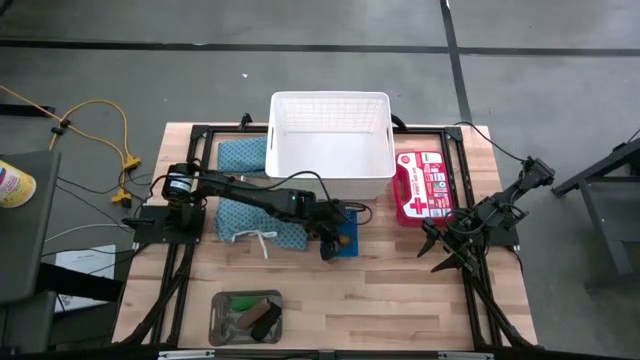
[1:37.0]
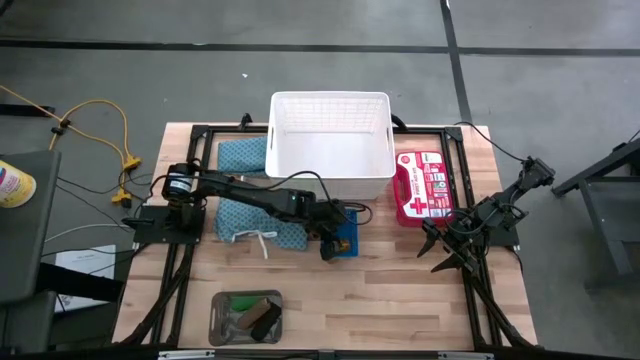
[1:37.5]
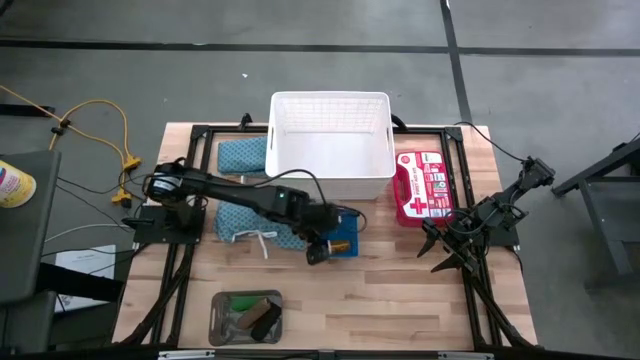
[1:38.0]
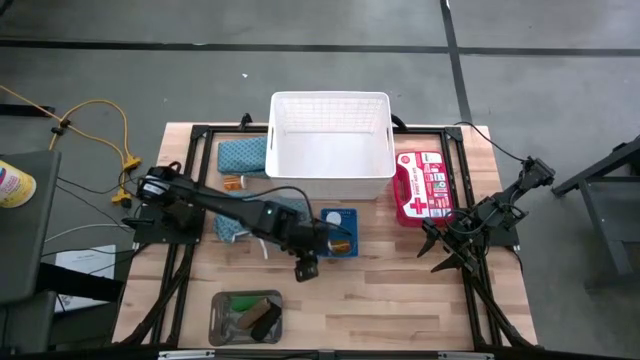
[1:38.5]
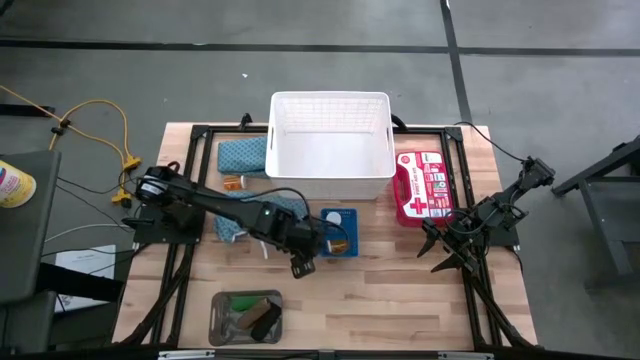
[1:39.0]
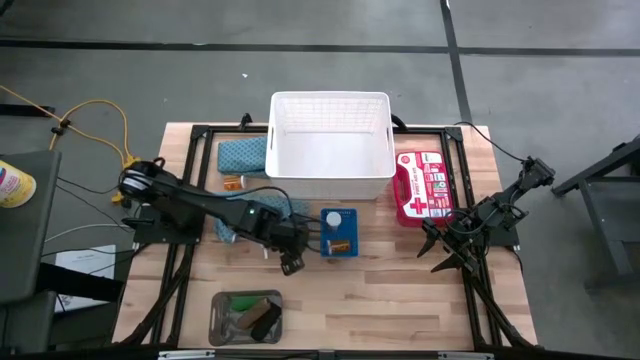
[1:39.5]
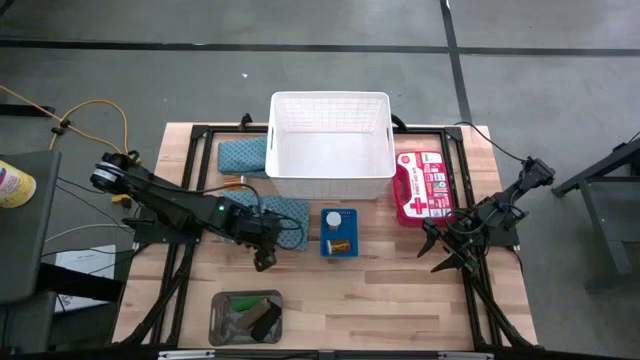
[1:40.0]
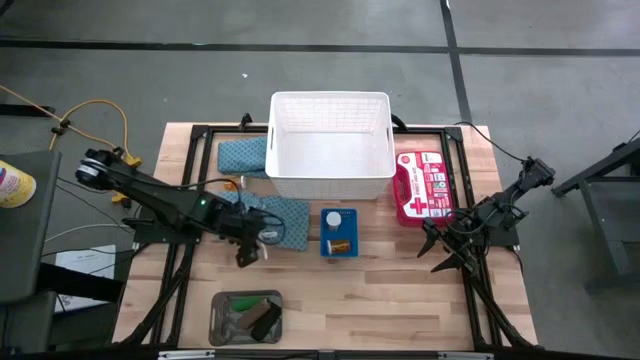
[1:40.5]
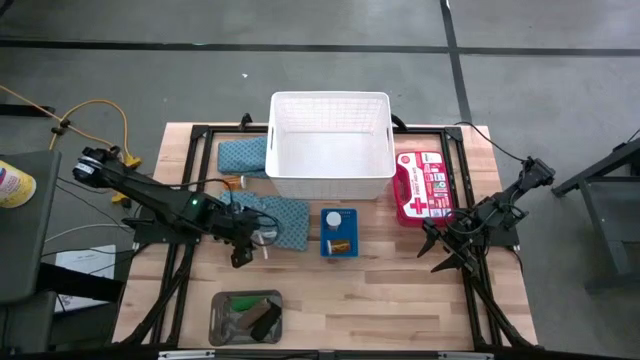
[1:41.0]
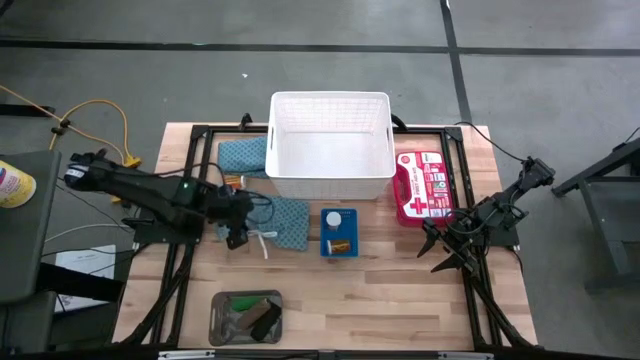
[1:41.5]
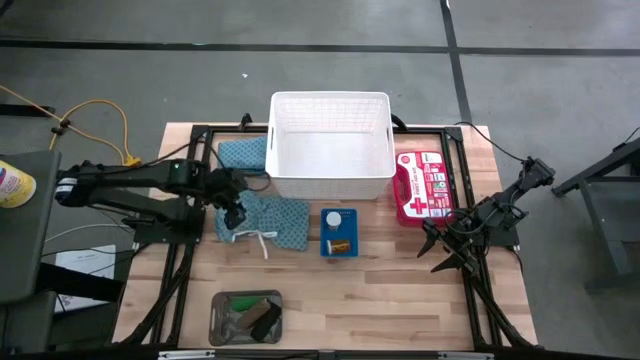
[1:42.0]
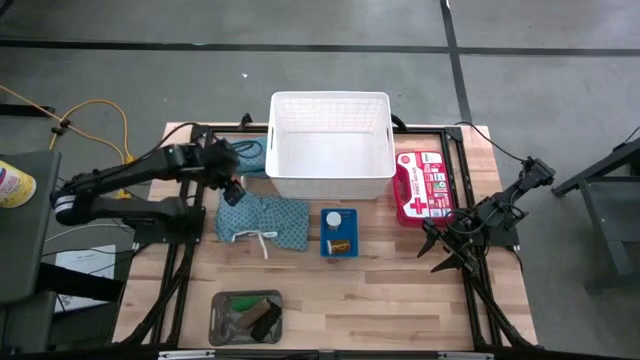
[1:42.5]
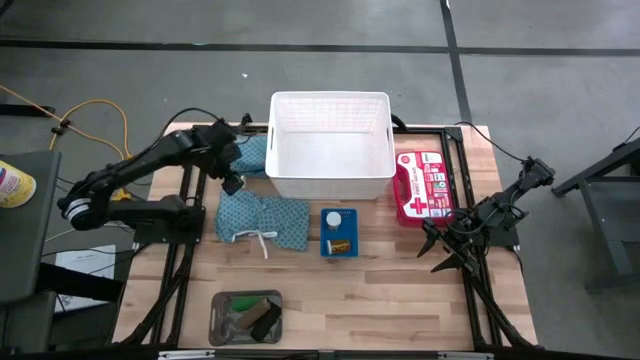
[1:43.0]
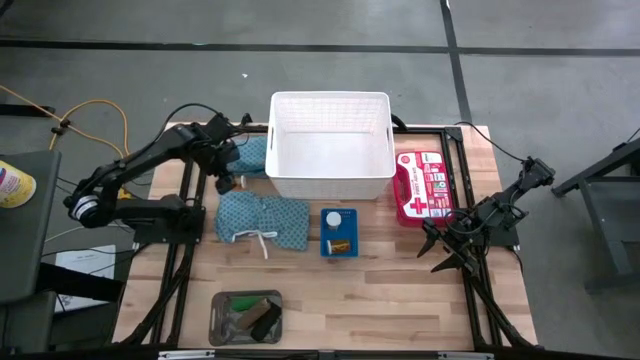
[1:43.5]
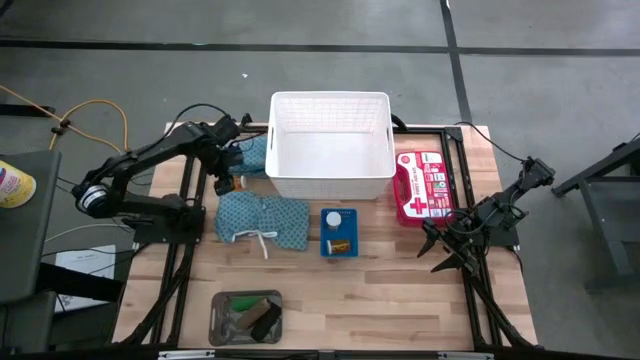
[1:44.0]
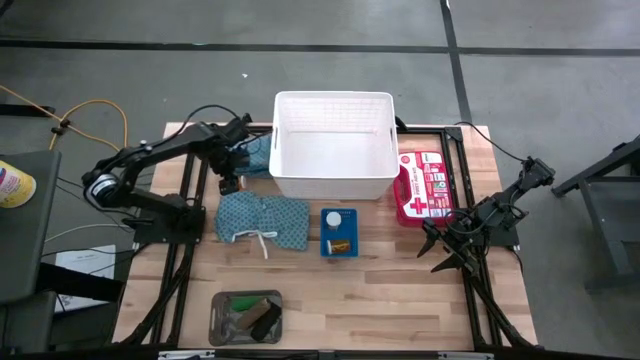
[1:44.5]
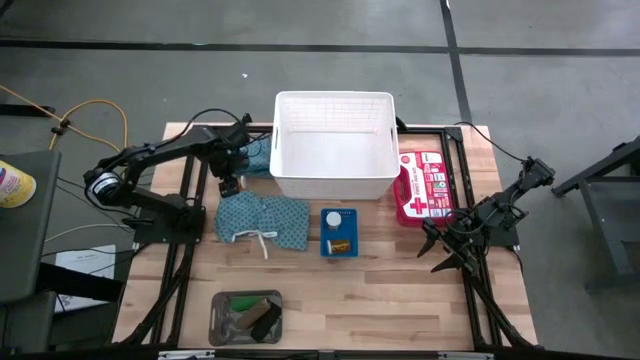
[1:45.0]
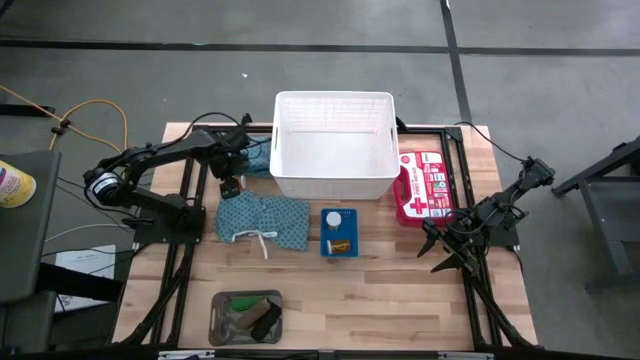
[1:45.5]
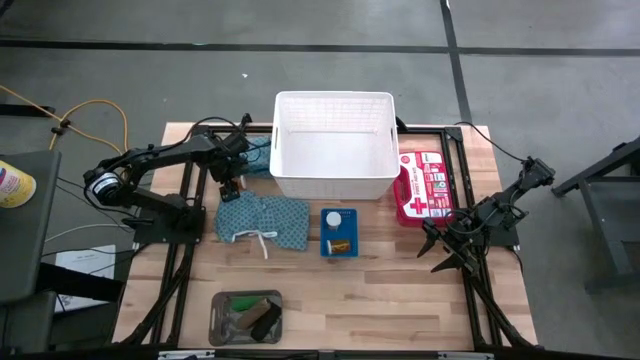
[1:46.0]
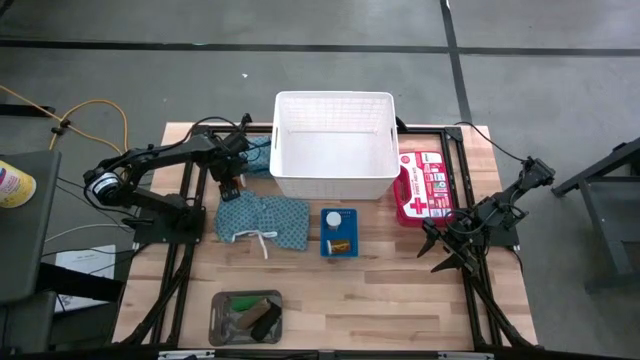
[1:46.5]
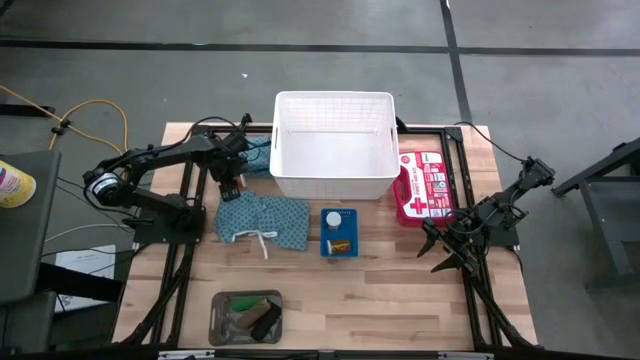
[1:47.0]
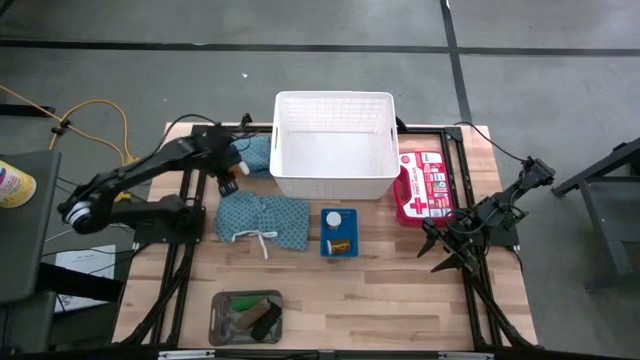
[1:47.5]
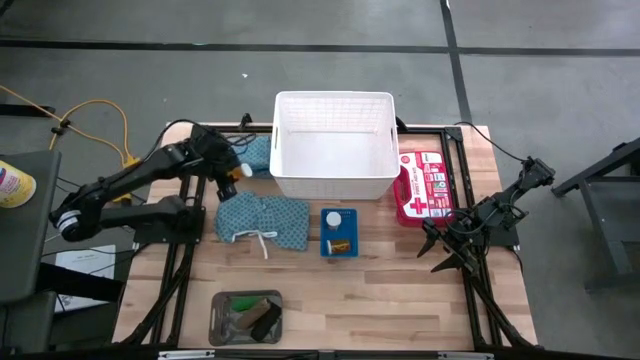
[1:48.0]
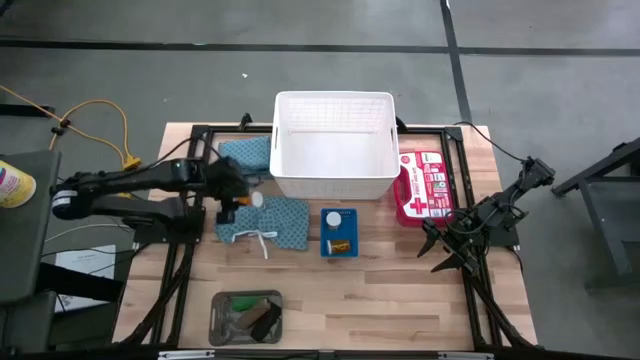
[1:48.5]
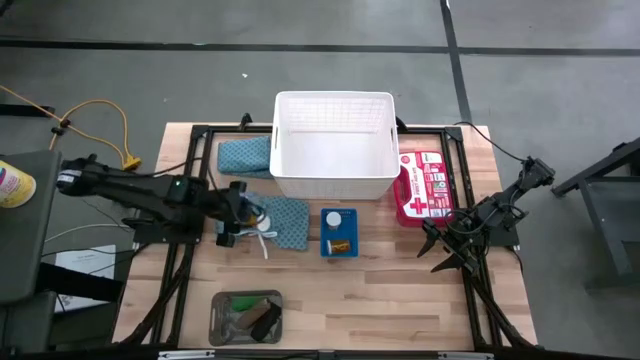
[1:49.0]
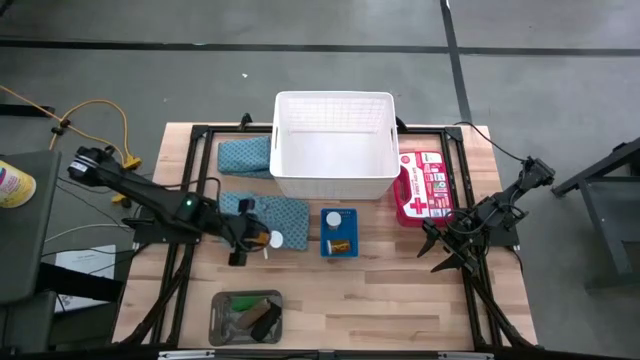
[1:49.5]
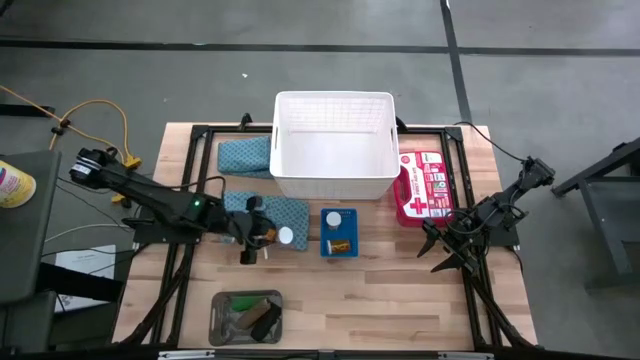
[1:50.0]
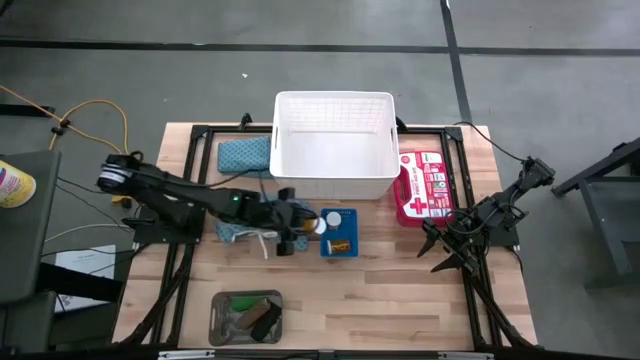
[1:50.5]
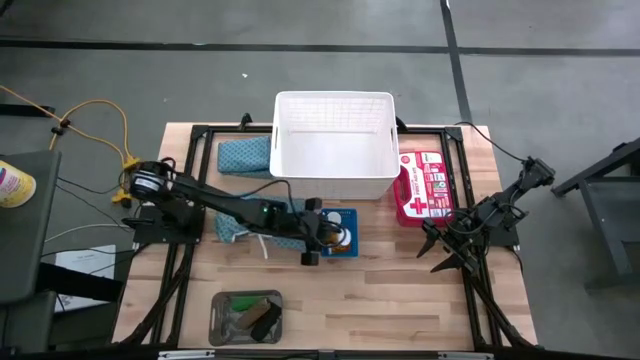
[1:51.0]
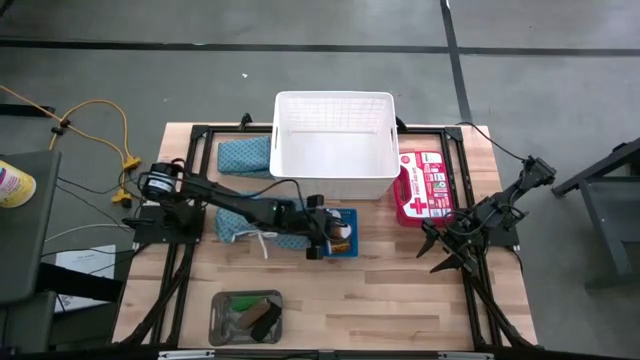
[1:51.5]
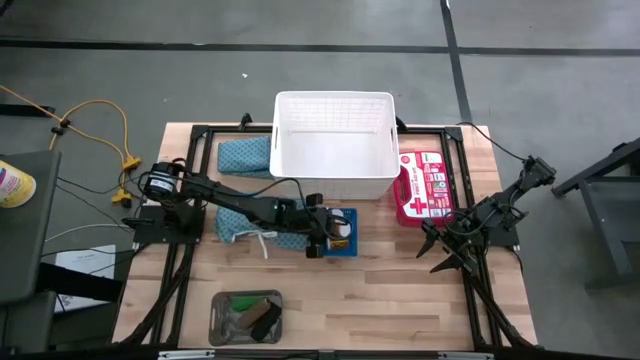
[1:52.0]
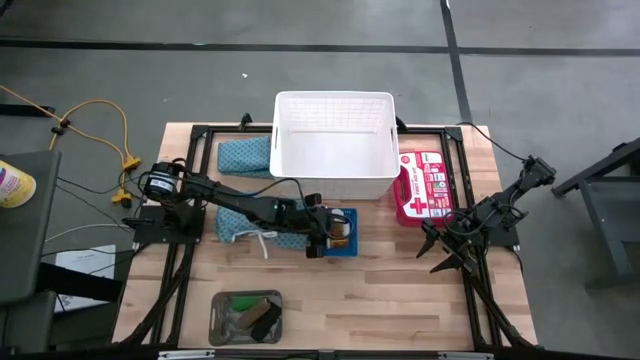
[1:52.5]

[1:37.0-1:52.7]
Task: Pick & place medical supplies in basket/bin
Put the orange pill bottle into the blue bin

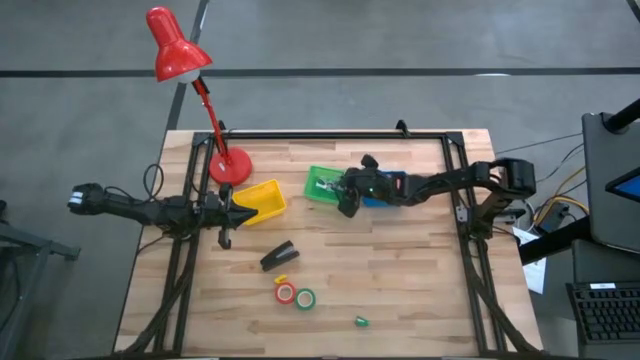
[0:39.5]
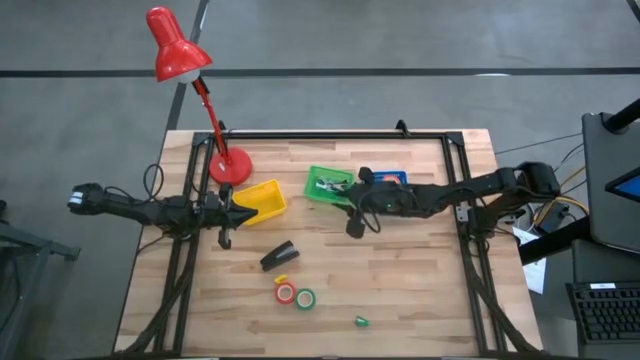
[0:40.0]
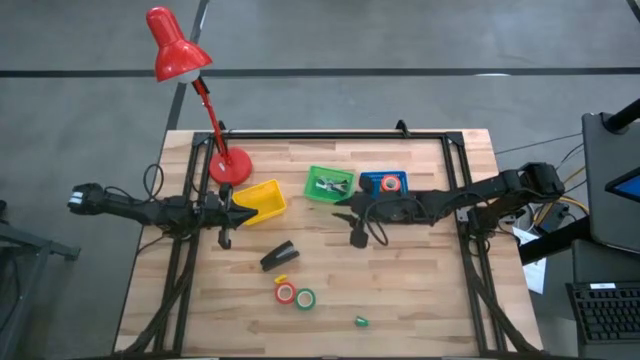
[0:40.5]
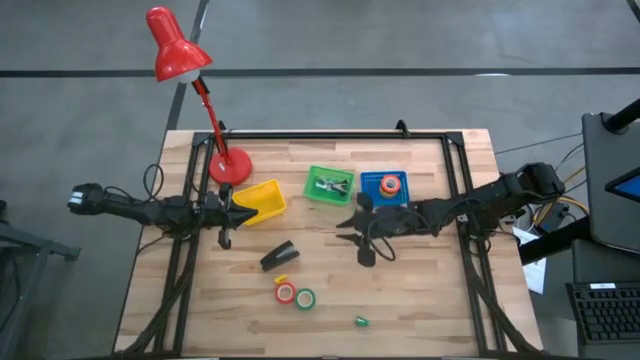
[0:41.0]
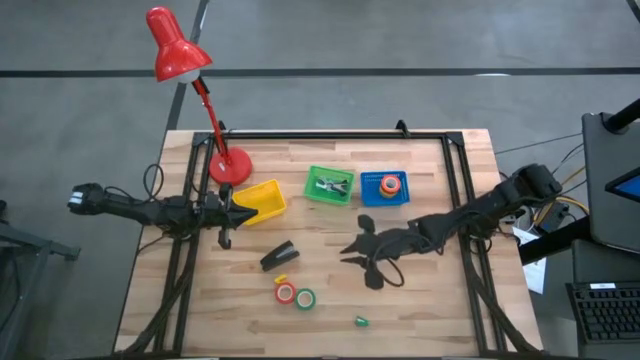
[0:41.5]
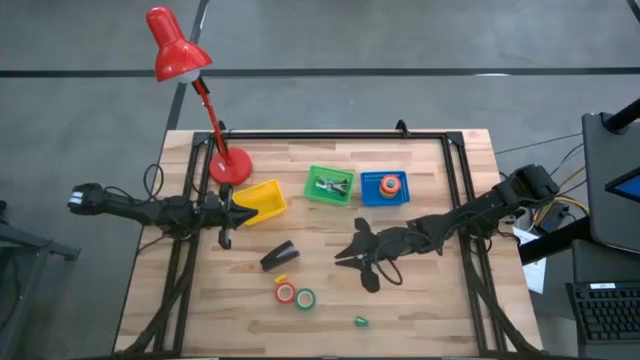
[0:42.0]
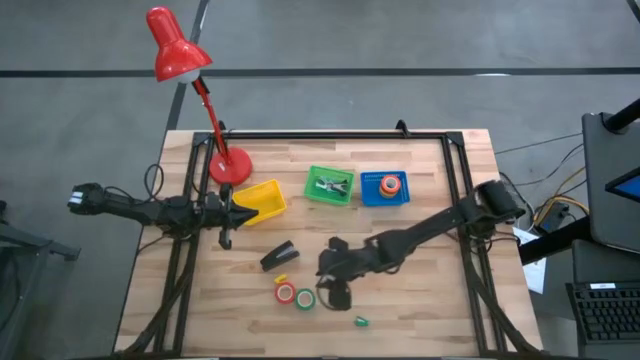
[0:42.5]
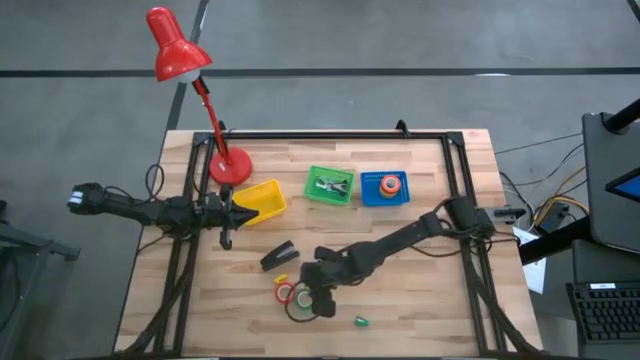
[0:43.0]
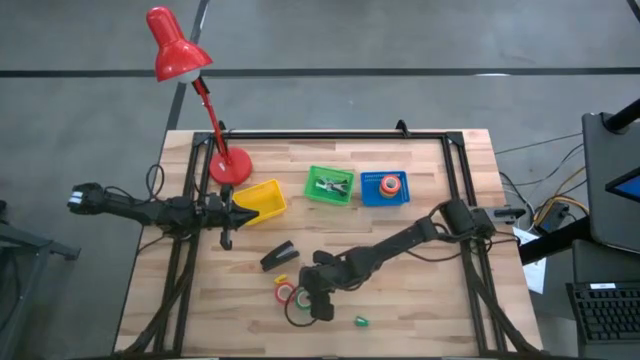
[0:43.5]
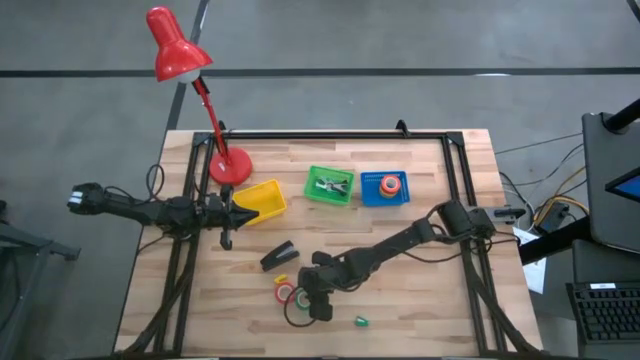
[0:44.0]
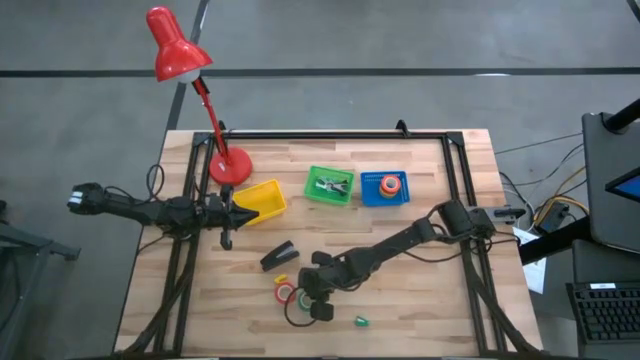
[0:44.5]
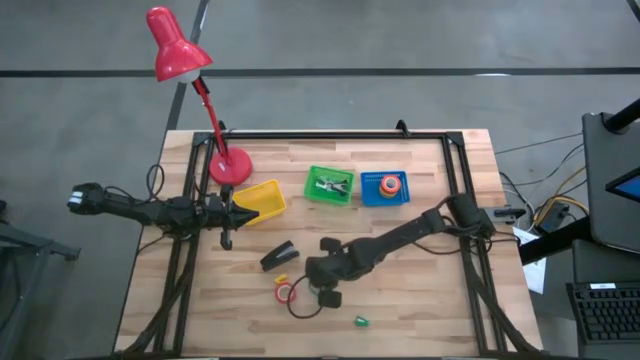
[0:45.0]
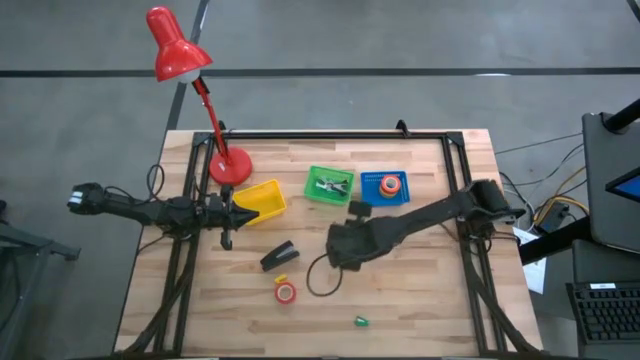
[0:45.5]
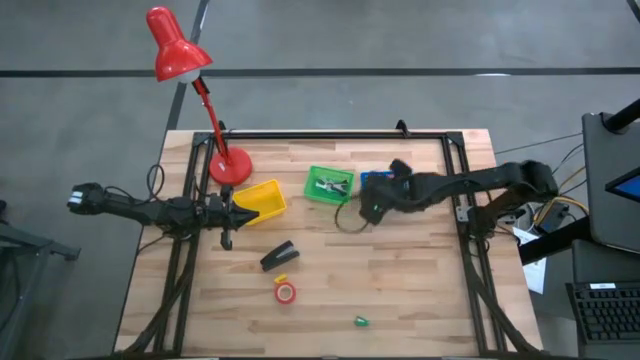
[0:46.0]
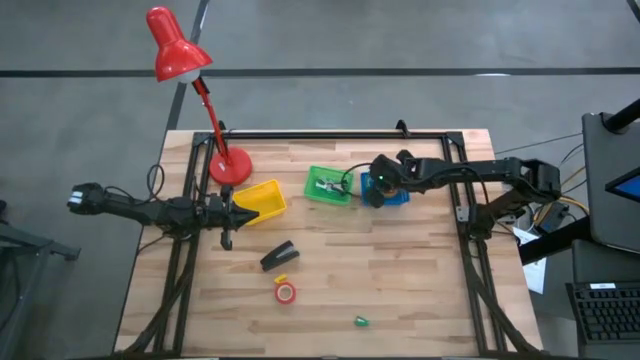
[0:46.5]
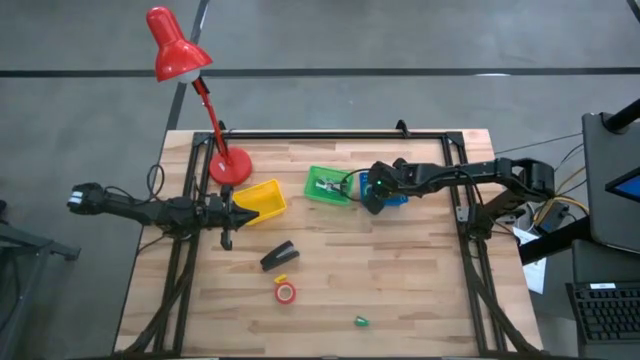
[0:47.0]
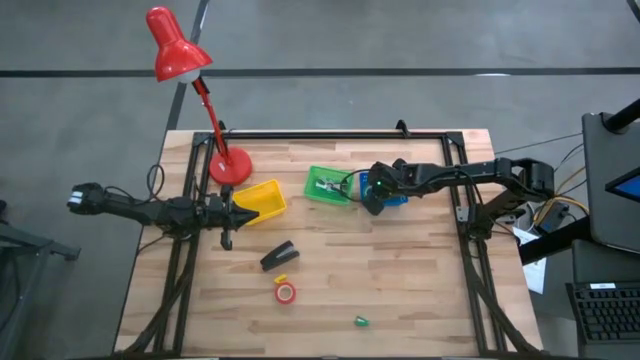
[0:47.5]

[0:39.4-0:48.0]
Task: Pick and place Stapler, Stapler remover, tape
Put the green tape in the blue basket
